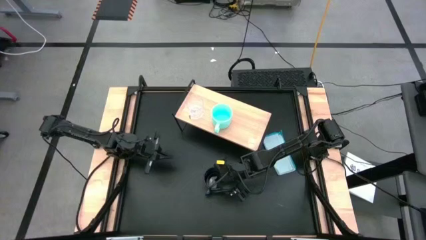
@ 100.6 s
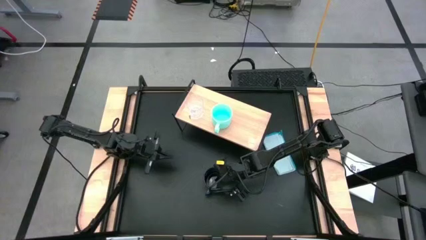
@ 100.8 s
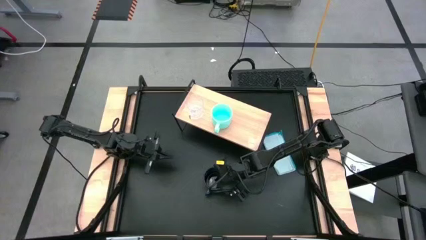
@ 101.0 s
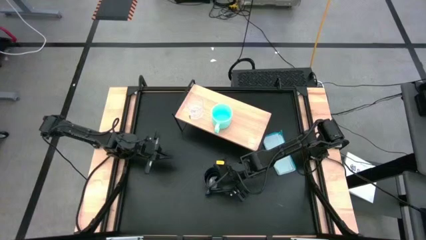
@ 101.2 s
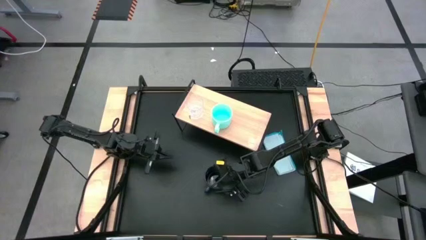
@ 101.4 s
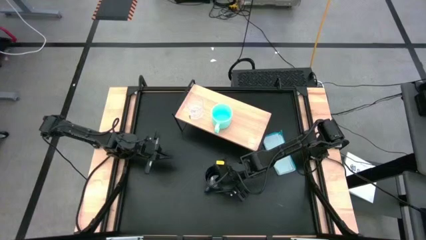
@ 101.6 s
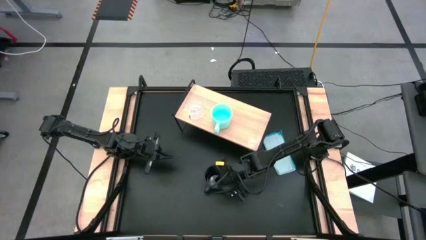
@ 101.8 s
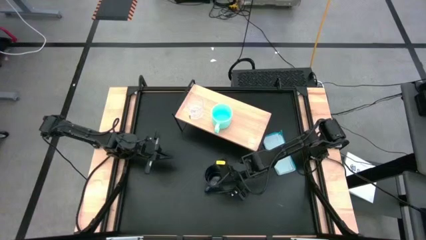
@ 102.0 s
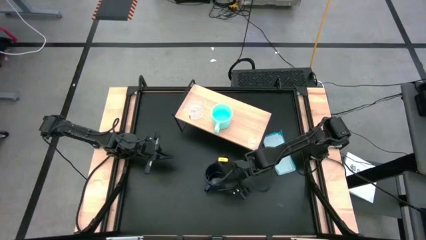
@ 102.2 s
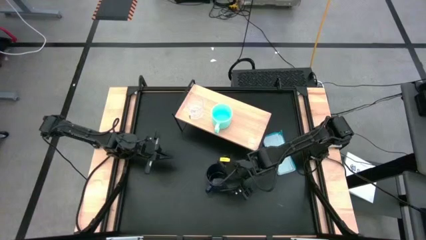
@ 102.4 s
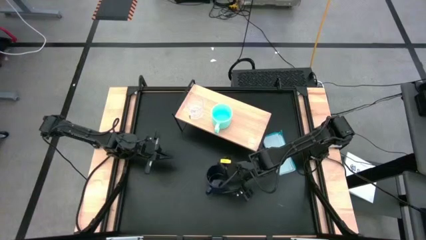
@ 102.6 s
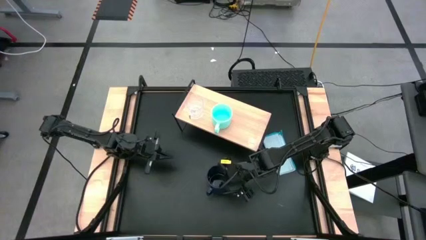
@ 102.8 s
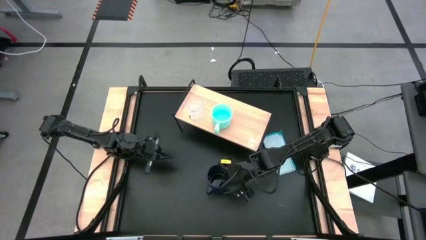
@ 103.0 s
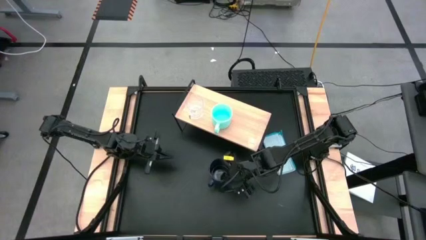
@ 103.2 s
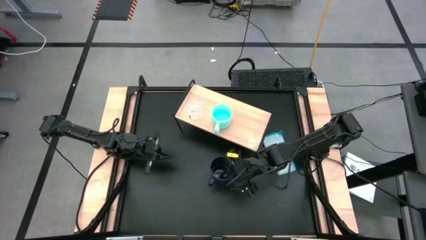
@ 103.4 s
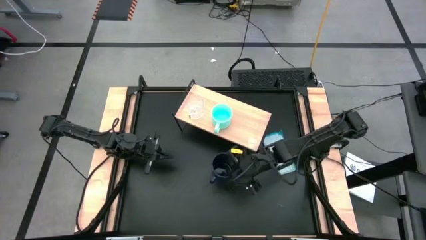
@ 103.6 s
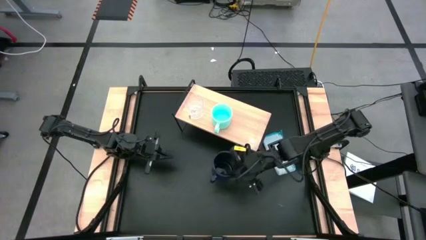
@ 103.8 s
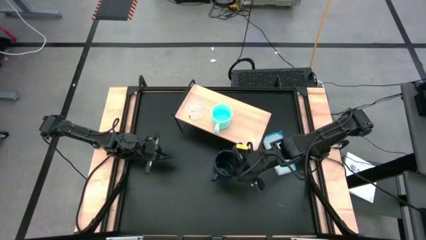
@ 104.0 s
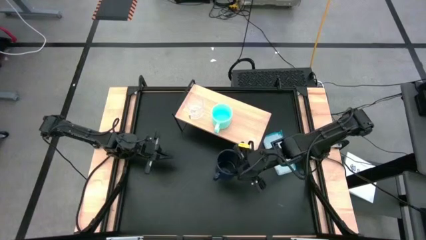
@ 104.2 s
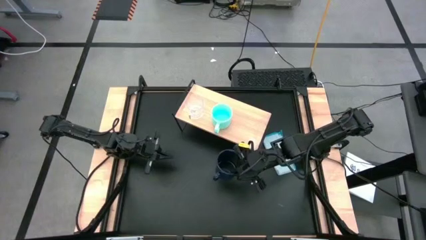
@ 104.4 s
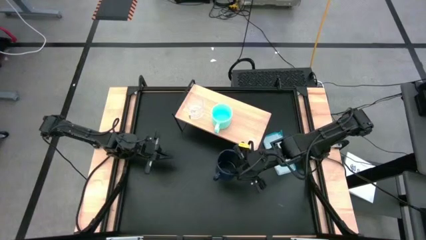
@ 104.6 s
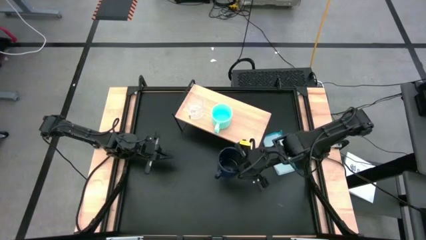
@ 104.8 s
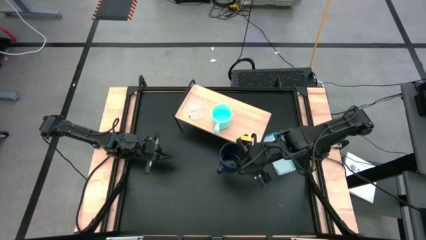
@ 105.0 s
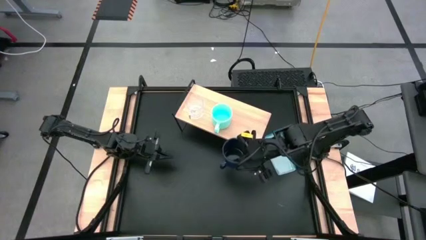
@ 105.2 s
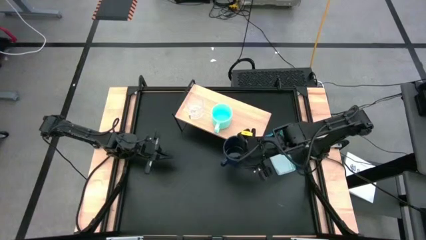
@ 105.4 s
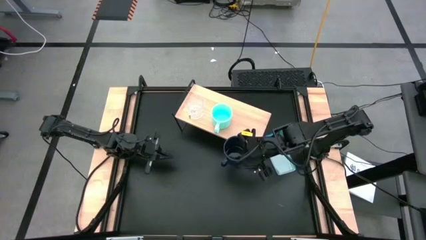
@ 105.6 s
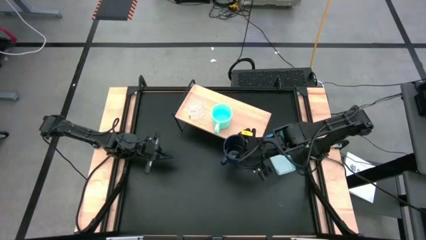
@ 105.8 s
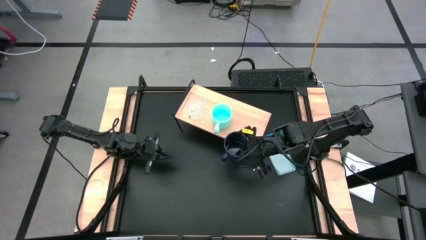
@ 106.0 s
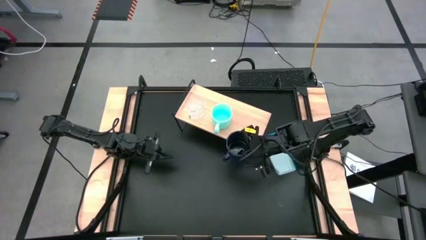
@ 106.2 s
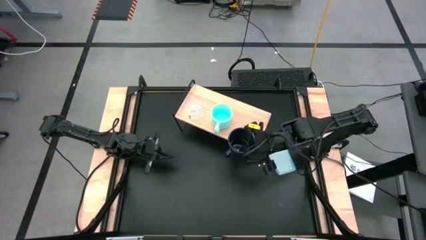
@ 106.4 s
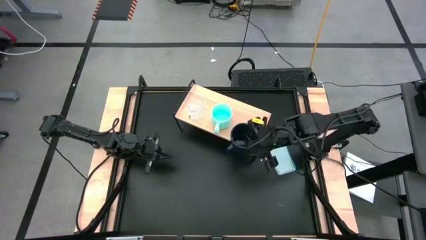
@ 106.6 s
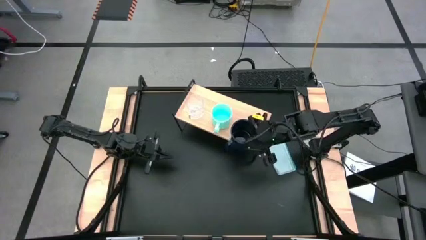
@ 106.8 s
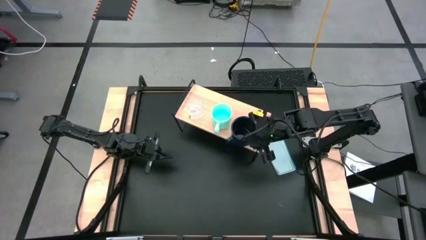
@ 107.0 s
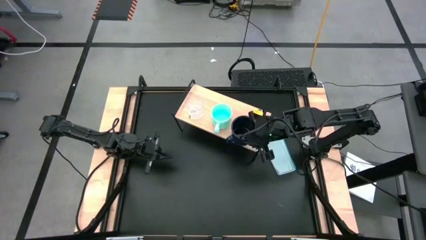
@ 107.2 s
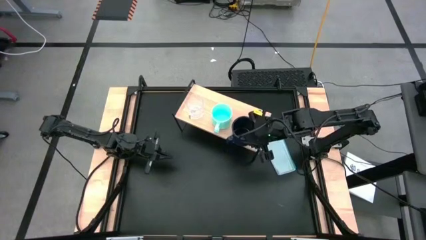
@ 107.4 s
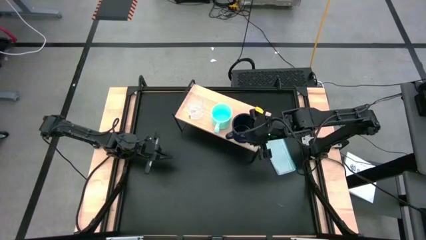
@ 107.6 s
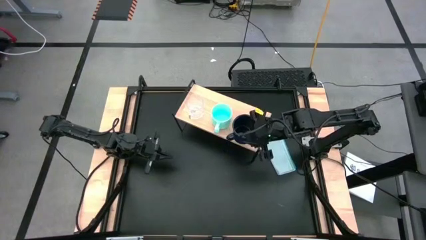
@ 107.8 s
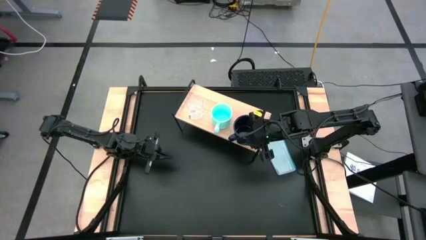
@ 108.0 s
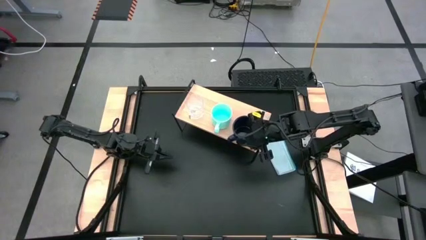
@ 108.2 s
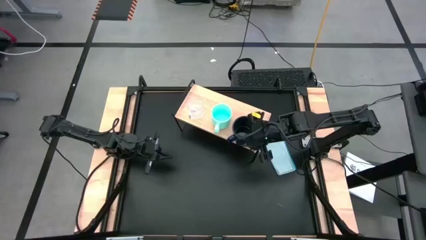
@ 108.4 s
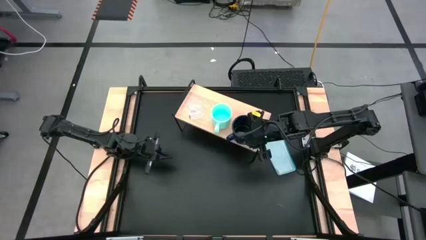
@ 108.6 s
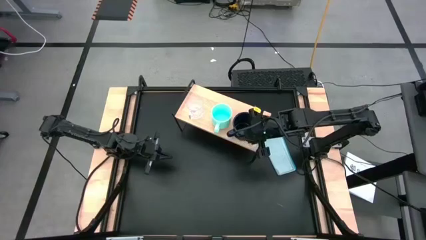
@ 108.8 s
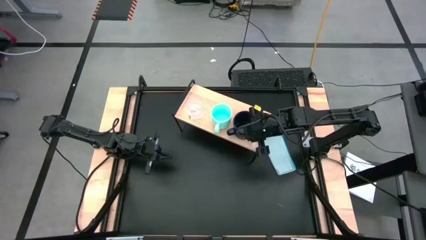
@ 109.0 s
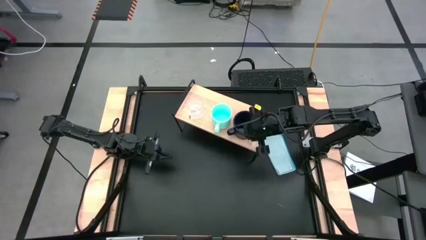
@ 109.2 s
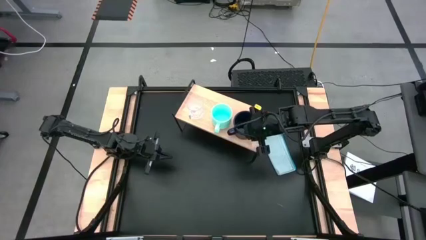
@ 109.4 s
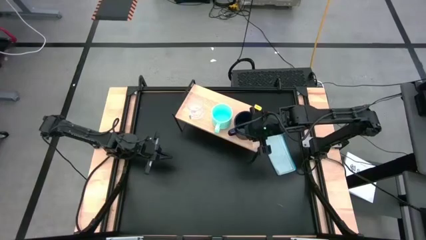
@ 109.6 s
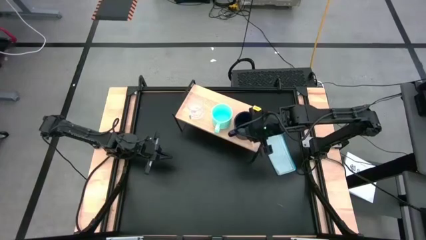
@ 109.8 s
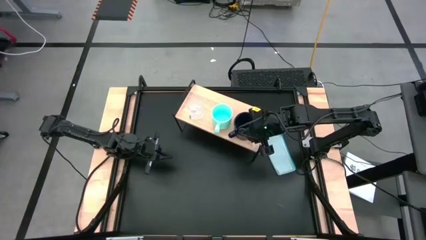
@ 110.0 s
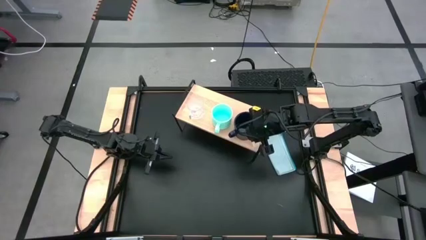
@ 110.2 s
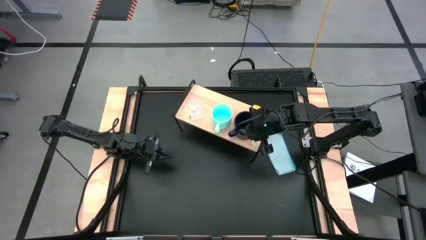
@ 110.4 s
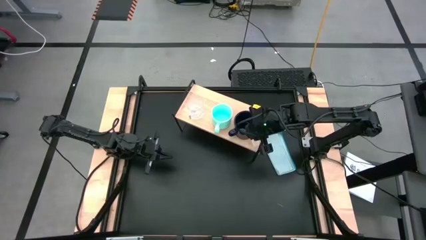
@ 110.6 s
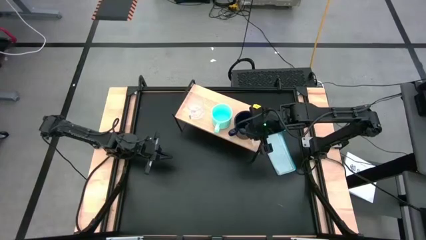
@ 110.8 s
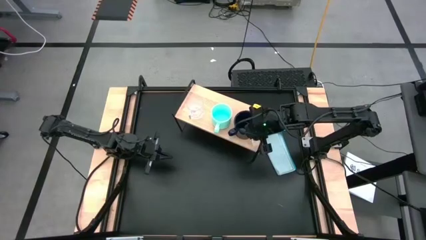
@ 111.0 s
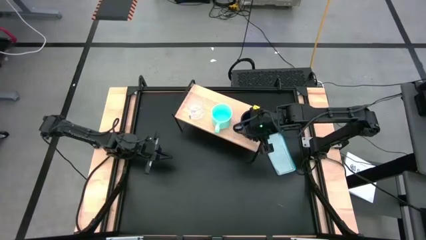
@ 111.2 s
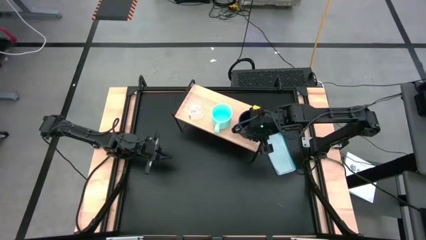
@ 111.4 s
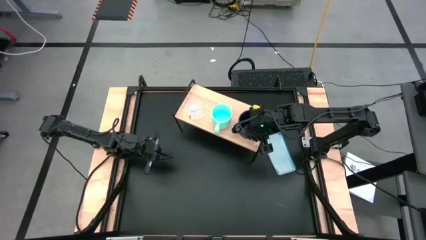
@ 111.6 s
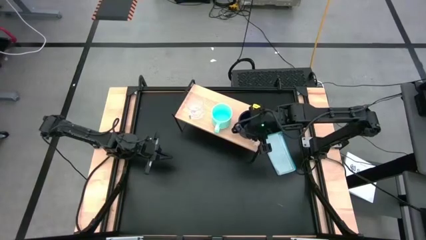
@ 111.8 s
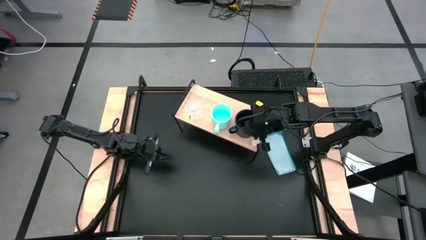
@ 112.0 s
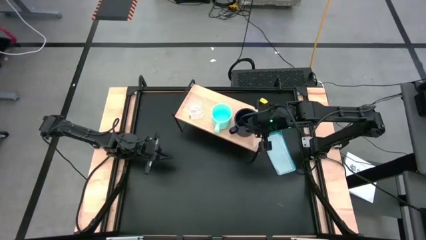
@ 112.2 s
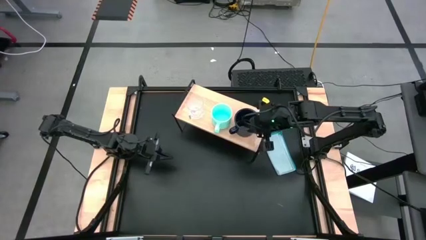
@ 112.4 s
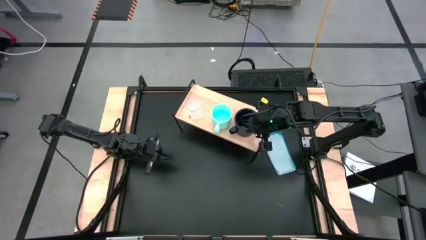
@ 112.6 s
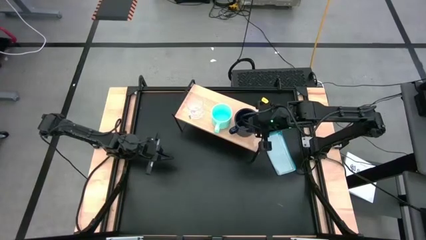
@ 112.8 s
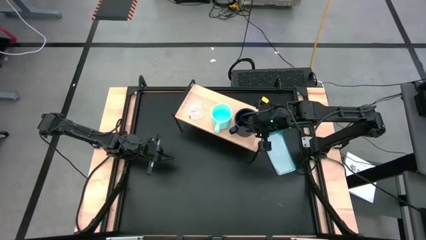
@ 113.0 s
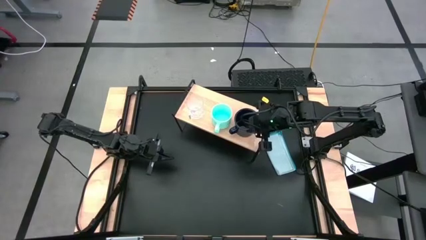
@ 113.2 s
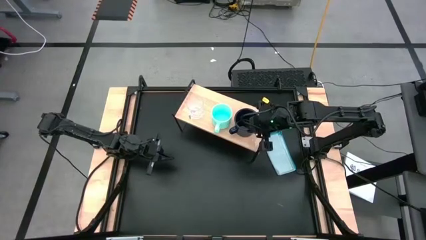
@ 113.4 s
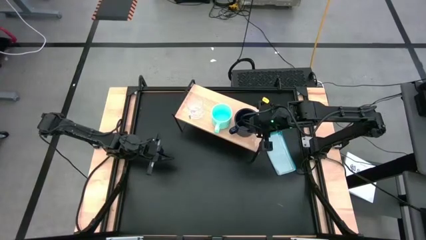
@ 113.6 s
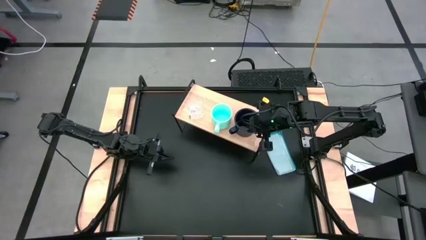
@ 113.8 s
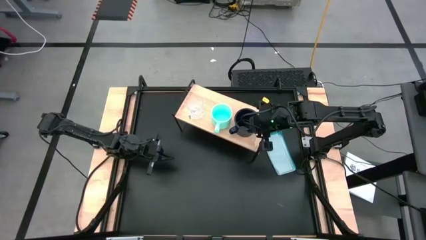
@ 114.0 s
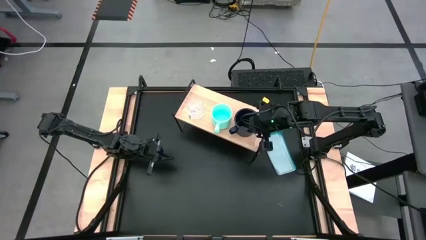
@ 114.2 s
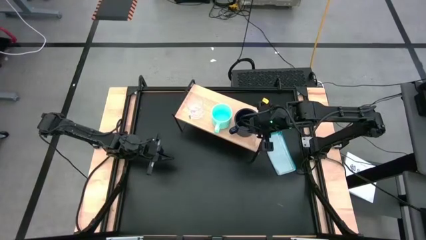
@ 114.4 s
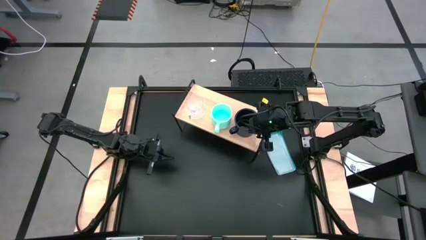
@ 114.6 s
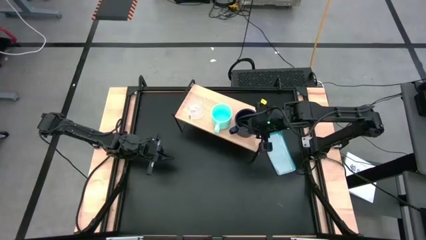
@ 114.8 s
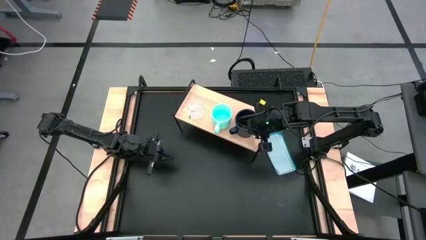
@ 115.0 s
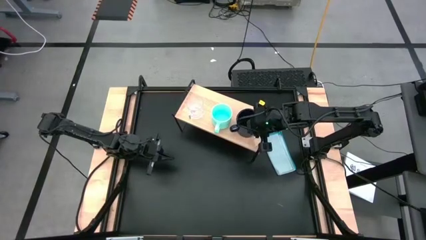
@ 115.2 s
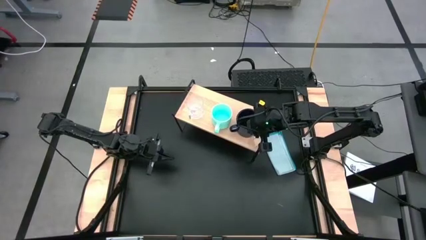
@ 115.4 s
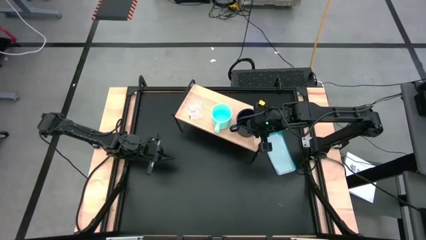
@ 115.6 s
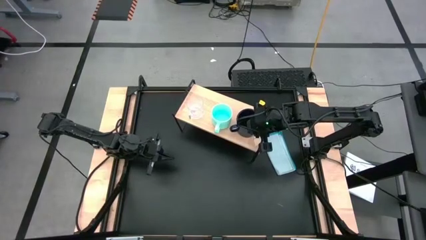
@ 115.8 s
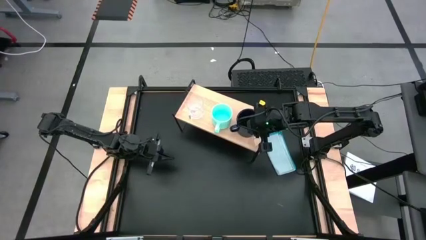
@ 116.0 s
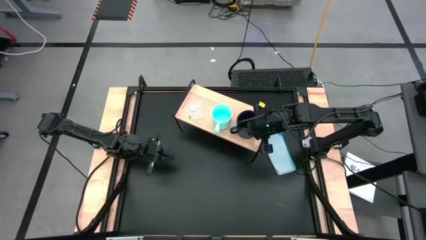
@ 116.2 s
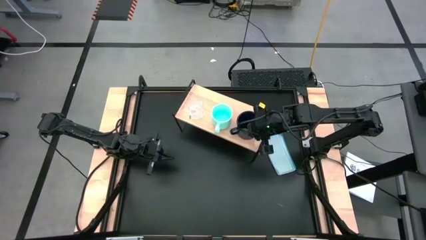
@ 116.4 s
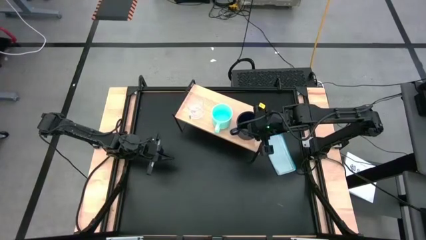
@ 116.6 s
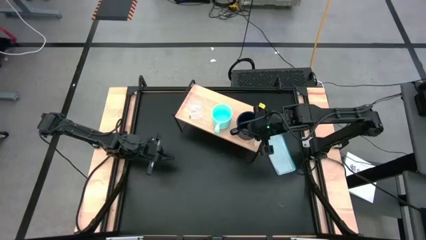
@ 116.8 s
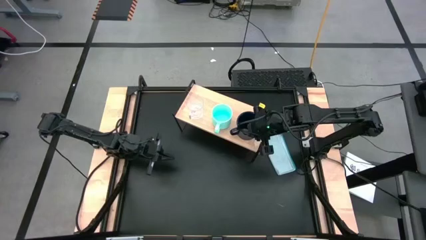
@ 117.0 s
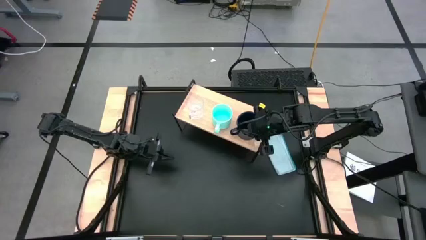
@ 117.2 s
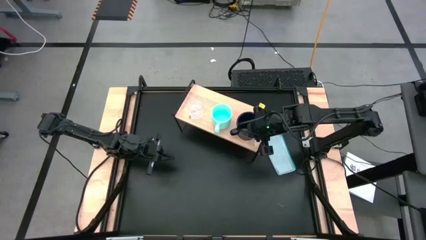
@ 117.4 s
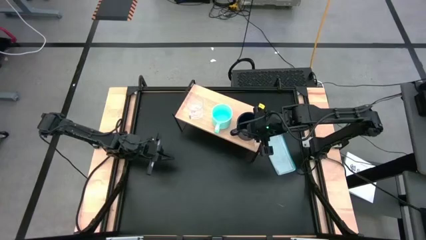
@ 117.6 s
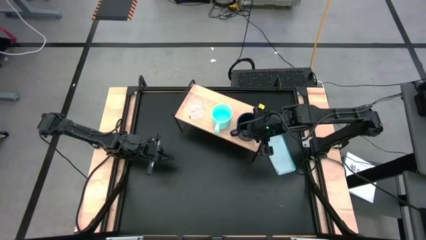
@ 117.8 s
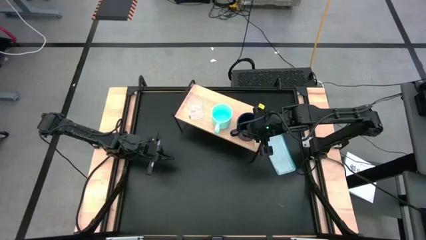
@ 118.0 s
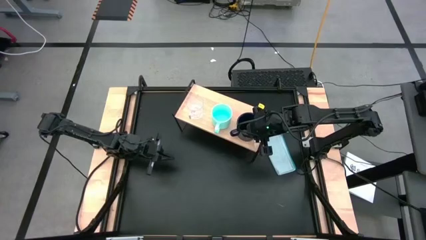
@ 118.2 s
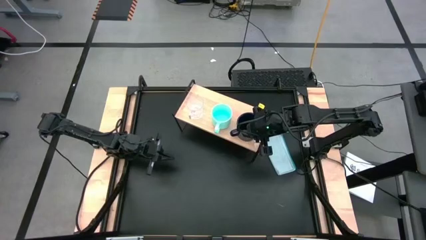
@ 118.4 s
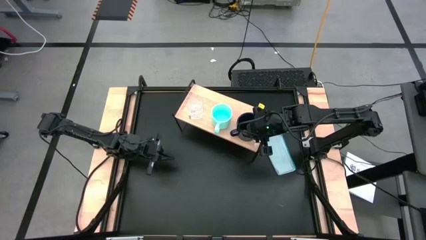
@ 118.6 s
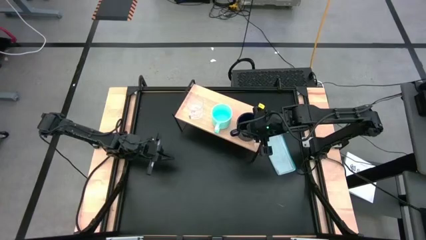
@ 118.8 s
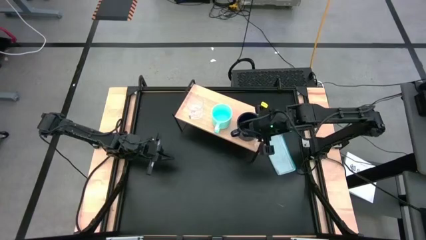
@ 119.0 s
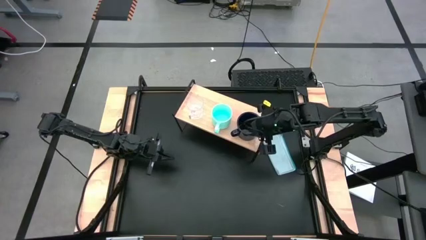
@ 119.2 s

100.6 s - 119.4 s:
Task: Stack small to large cups/mugs on shelf
Put the dark blue mug on the shelf
